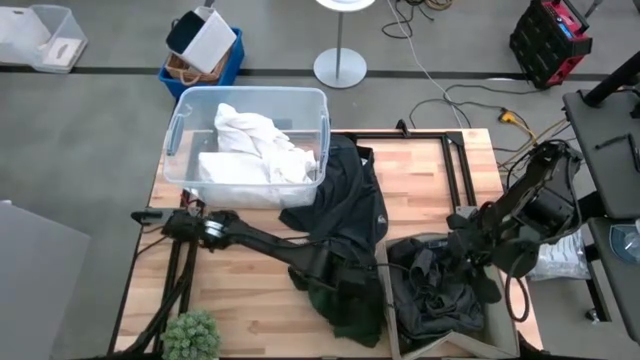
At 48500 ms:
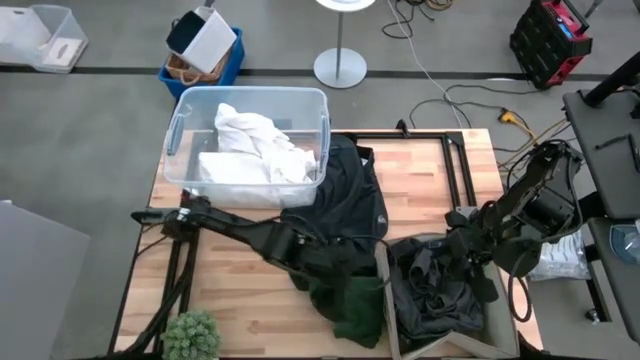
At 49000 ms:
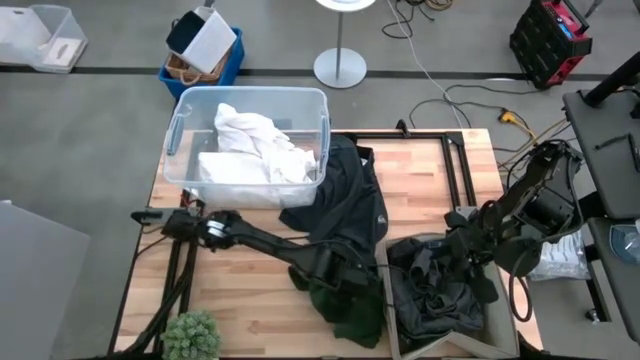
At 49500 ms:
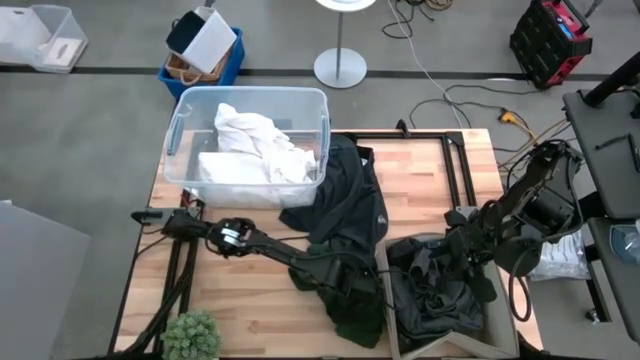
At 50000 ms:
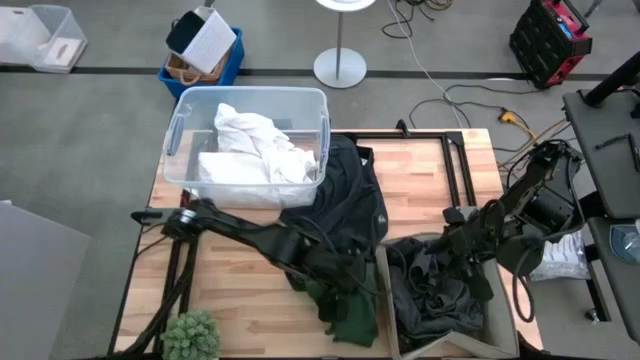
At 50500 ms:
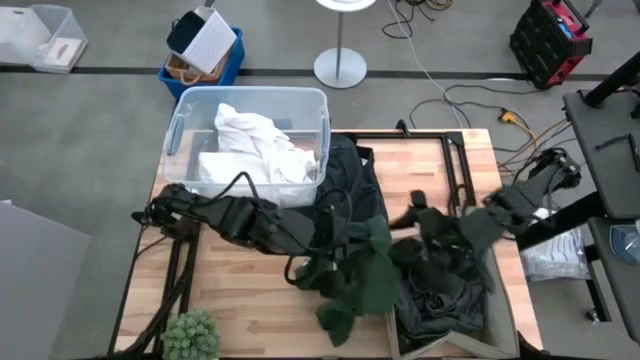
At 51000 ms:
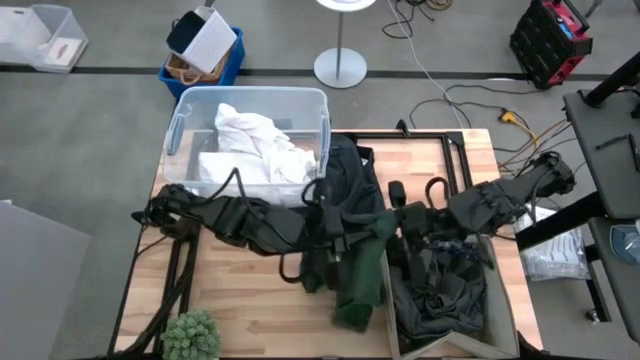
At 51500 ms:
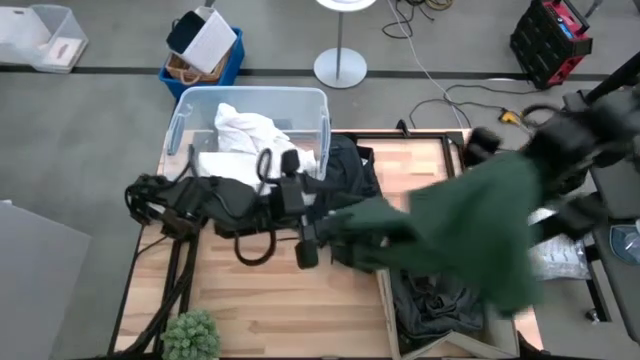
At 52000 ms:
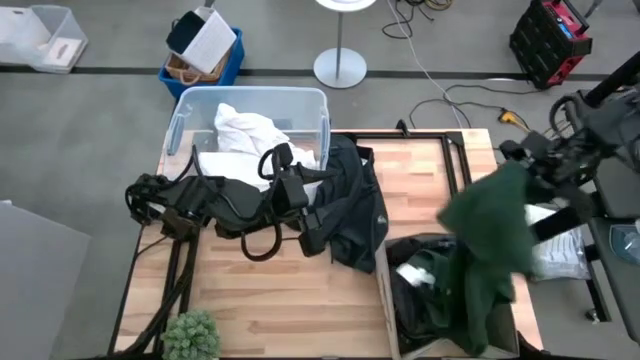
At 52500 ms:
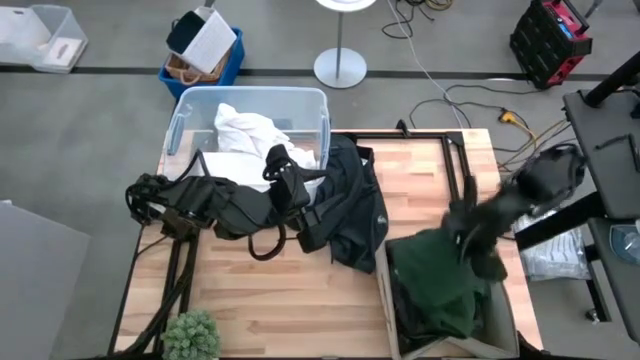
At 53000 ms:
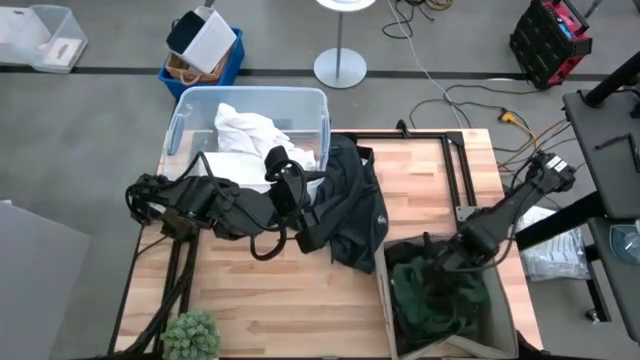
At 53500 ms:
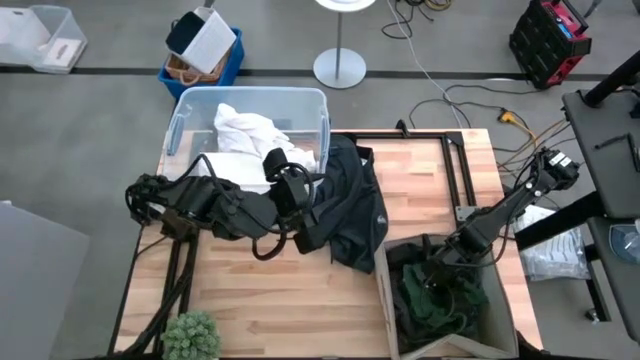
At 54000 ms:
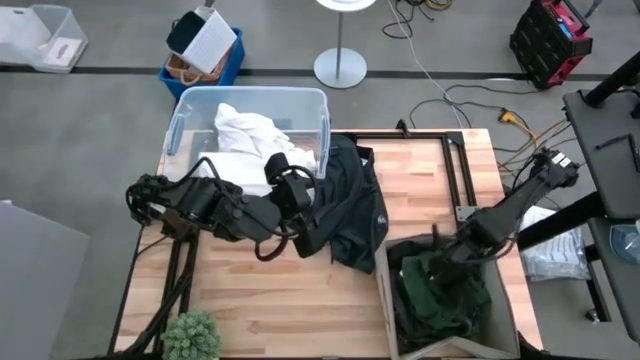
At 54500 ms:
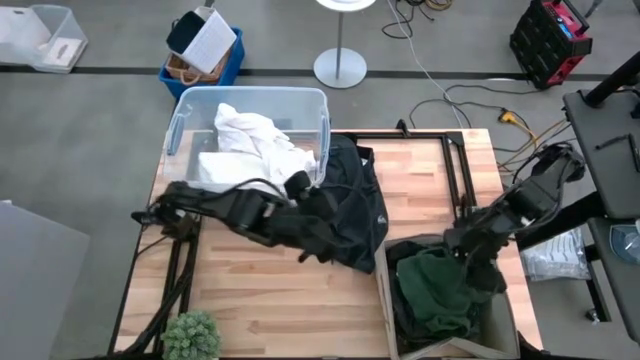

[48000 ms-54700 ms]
Task: Sort clothes
Put the dark green shirt into the laundry organizer

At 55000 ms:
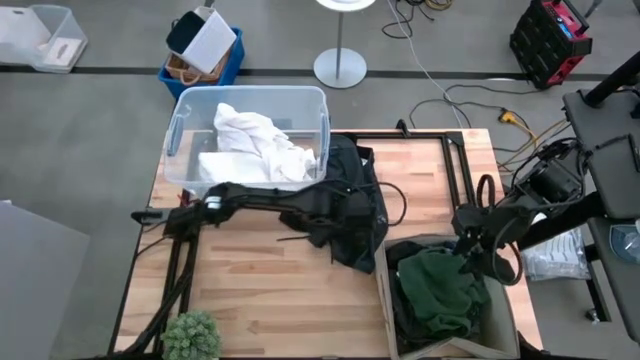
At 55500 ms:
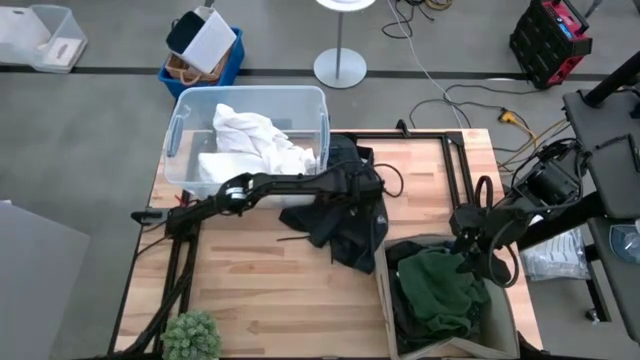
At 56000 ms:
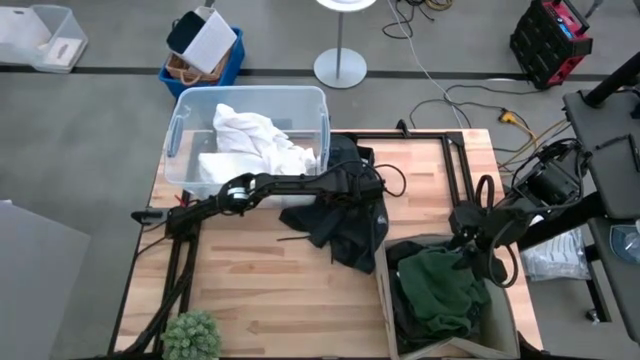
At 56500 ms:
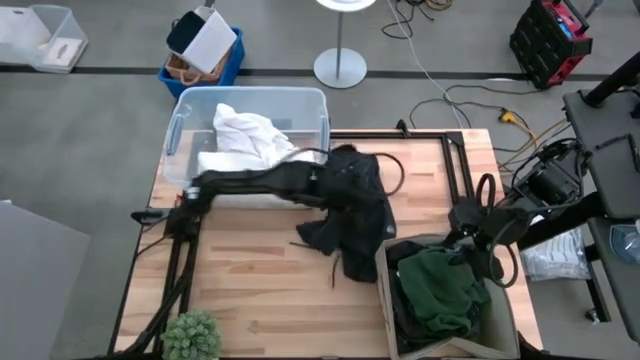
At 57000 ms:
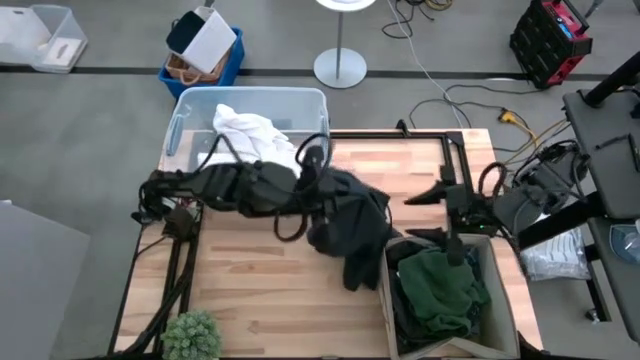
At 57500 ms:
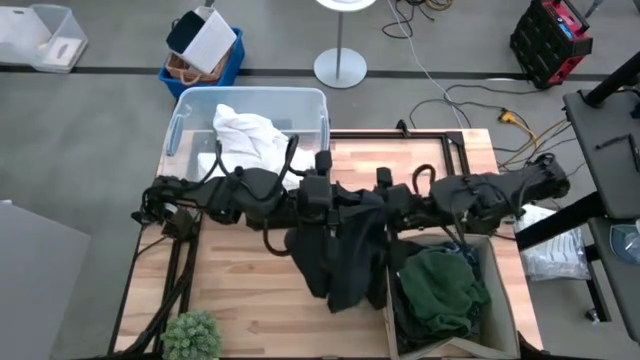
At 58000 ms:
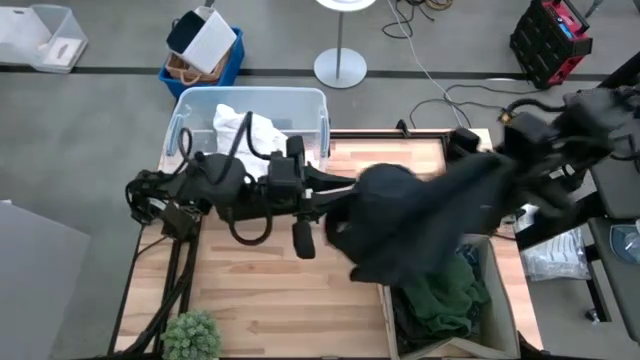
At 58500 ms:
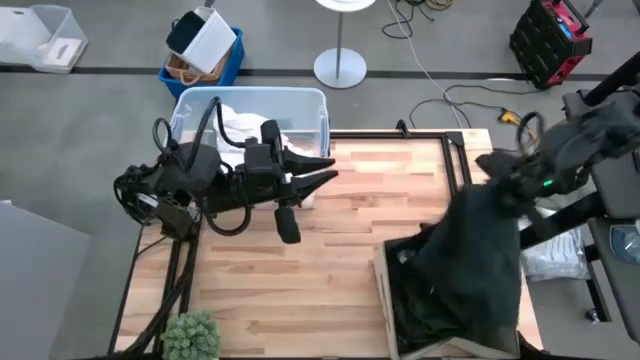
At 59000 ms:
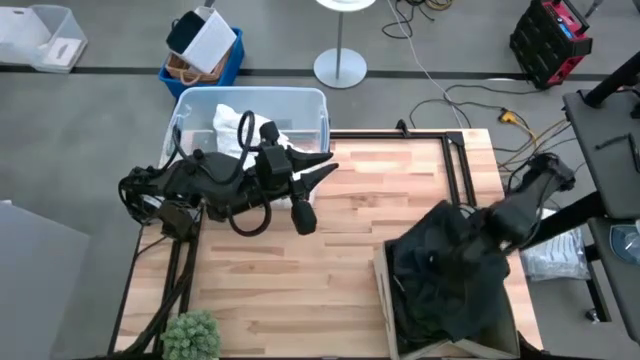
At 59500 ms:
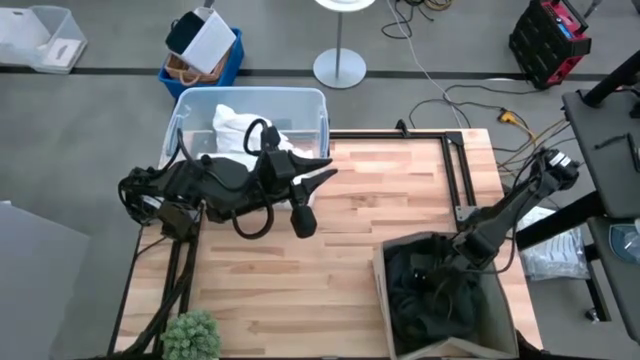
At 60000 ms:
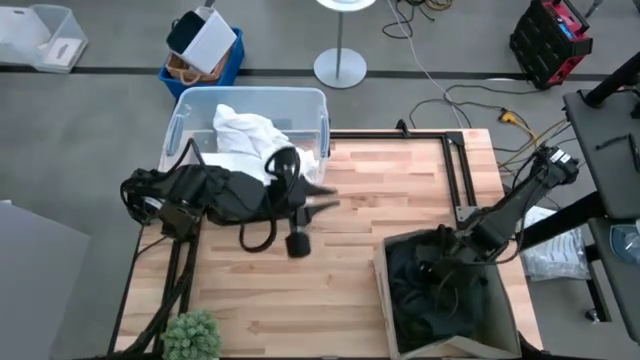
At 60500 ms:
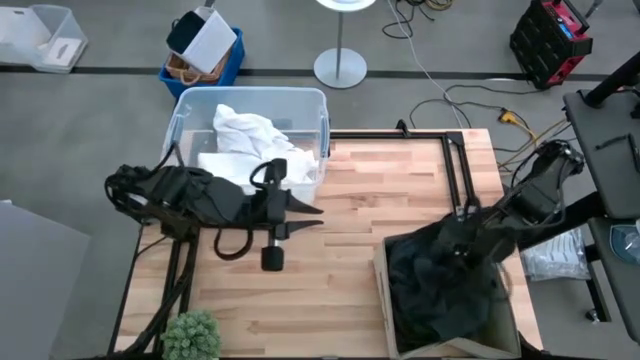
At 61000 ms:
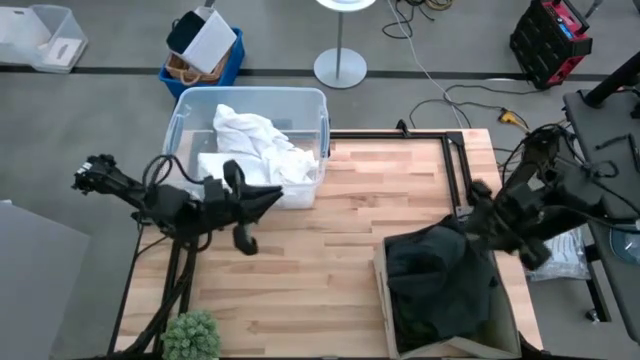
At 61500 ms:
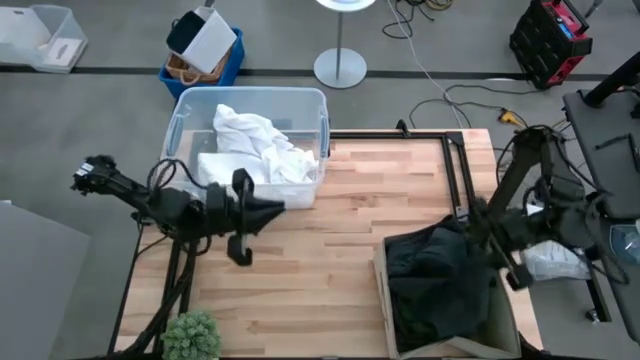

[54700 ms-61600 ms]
Put the dark blue shorts into the laundry organizer

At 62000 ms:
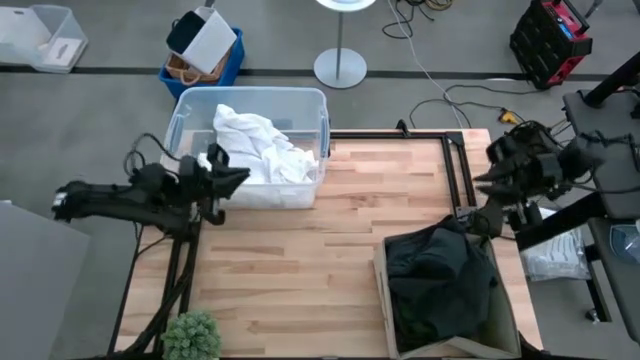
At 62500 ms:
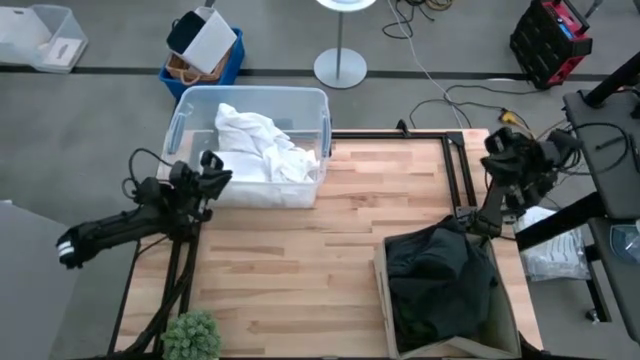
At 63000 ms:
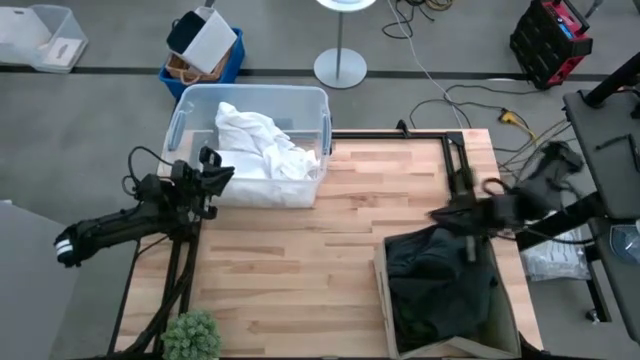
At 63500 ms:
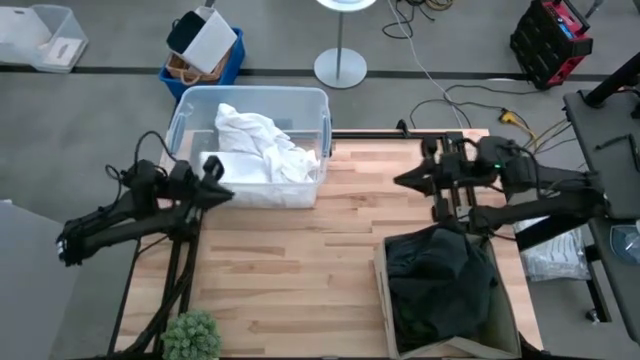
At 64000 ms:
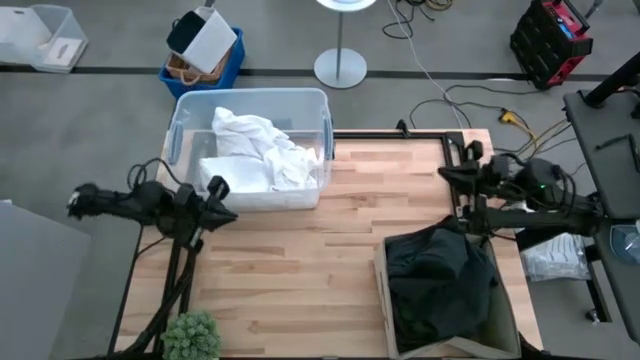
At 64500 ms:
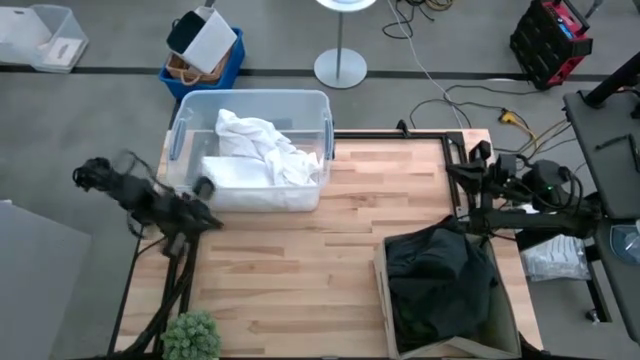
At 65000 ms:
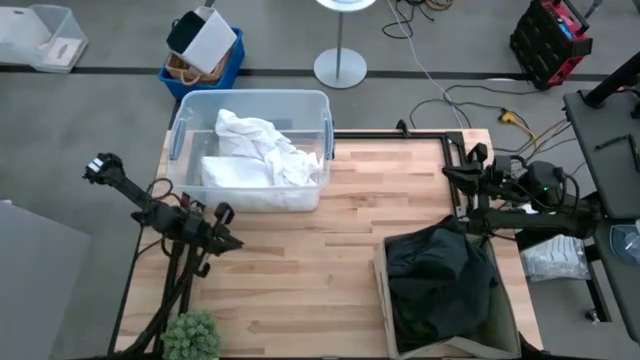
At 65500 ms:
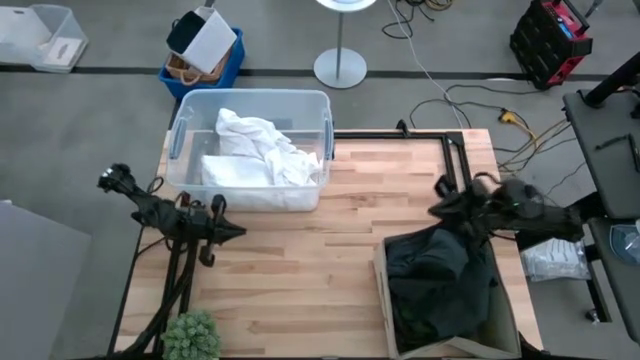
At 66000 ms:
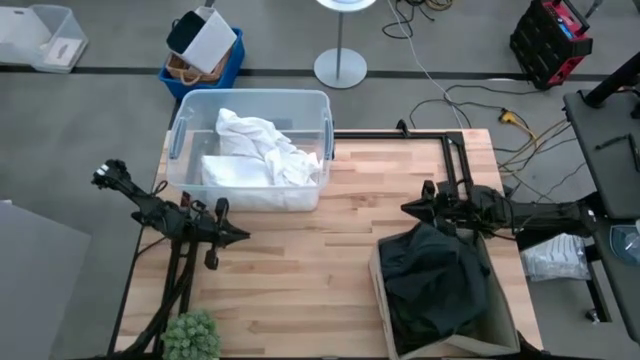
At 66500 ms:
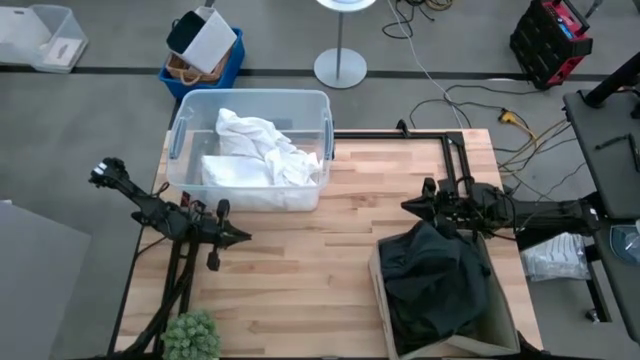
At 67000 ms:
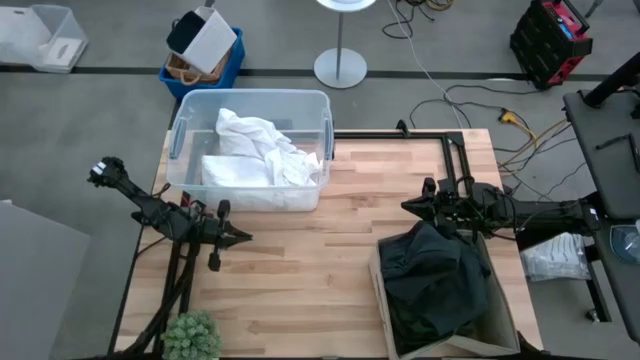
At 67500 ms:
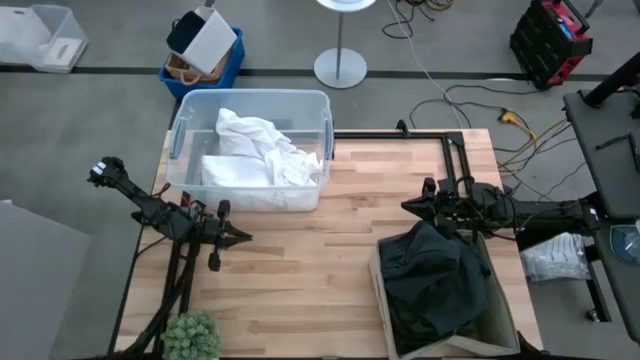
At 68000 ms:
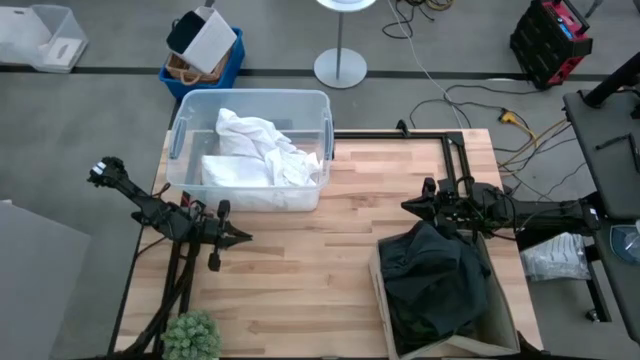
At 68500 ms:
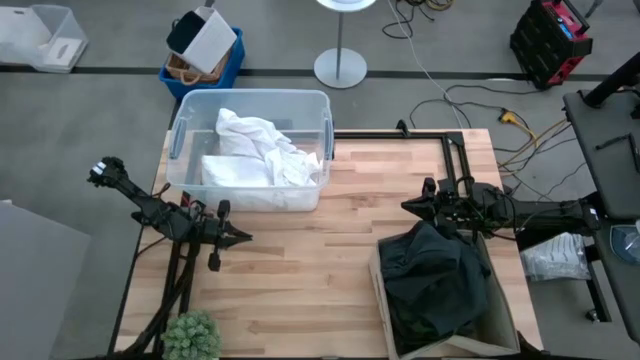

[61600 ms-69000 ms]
Return to Home Position

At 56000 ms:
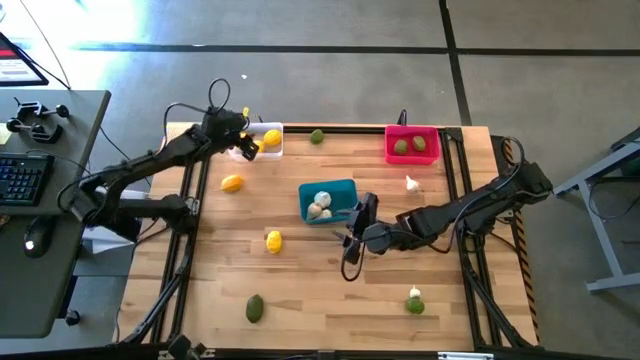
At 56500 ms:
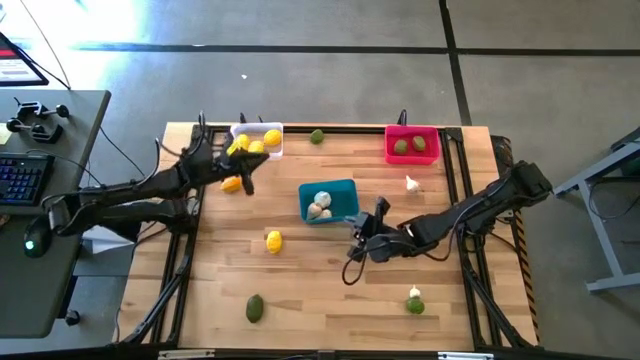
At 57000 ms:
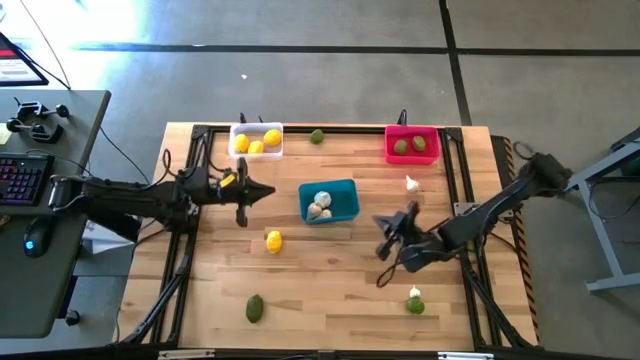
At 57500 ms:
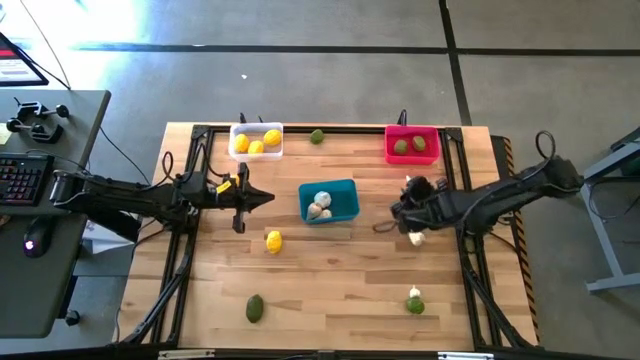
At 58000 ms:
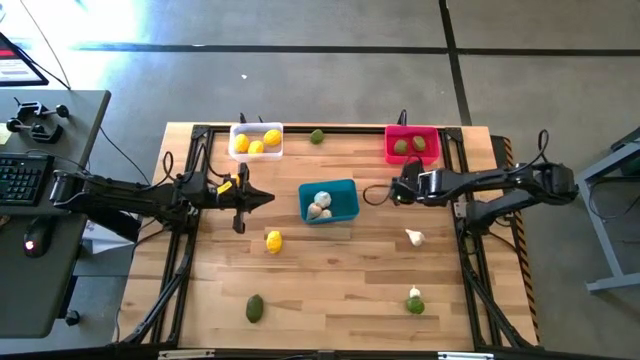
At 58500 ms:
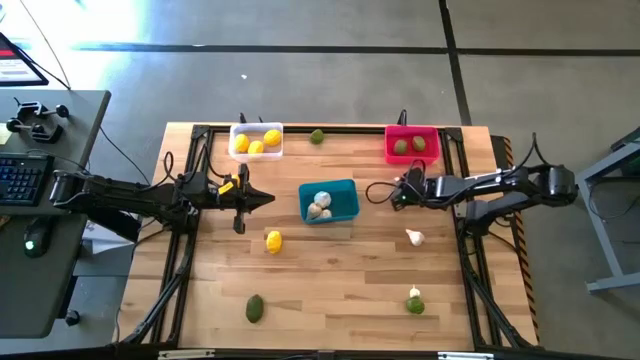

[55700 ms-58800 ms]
Task: Sort produce into baskets
Put the garlic into the blue bin
